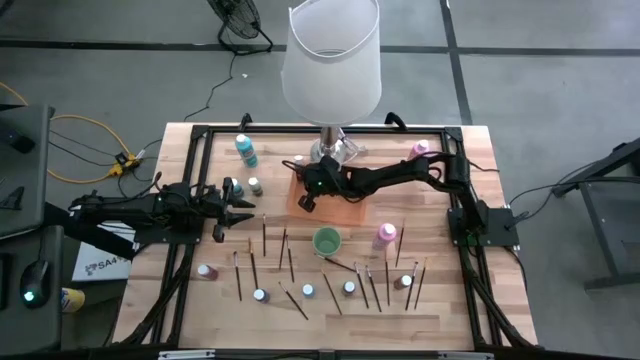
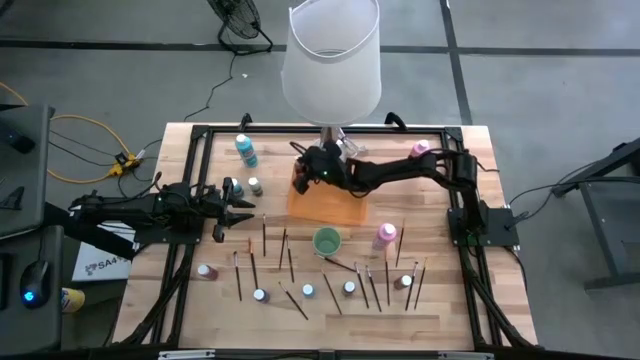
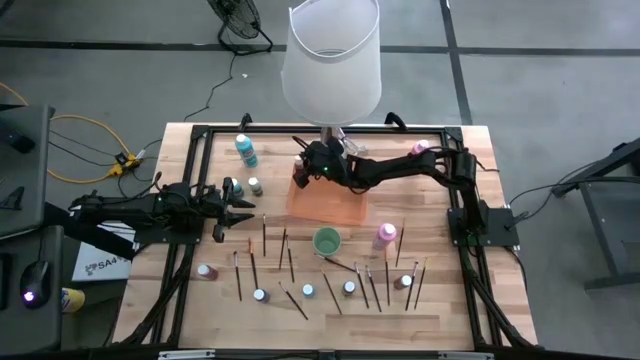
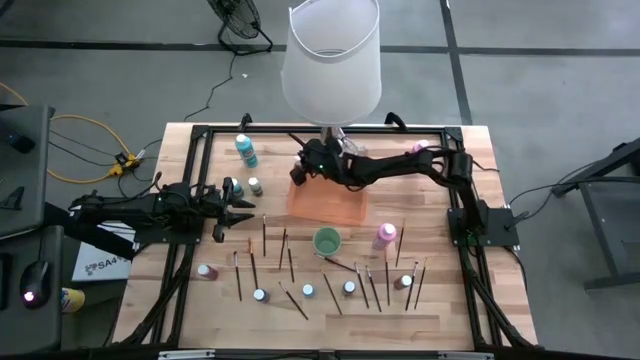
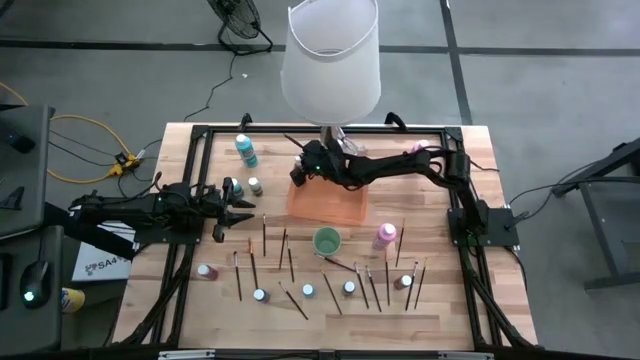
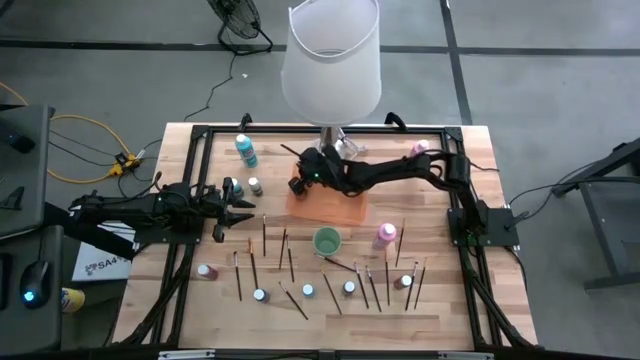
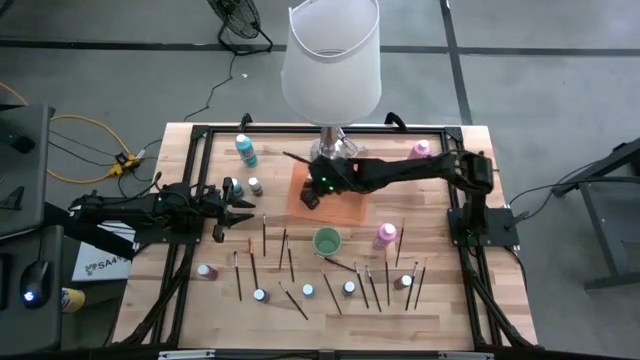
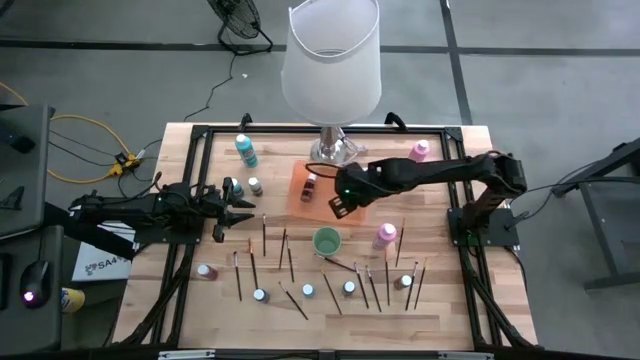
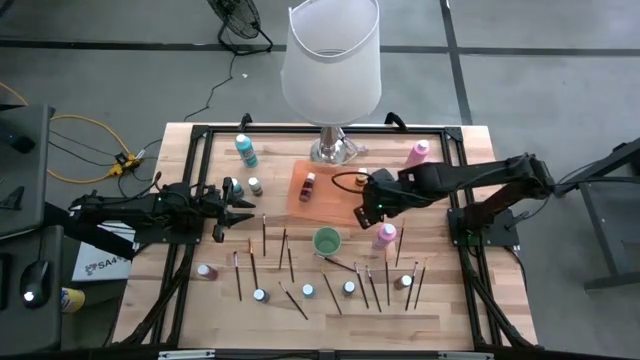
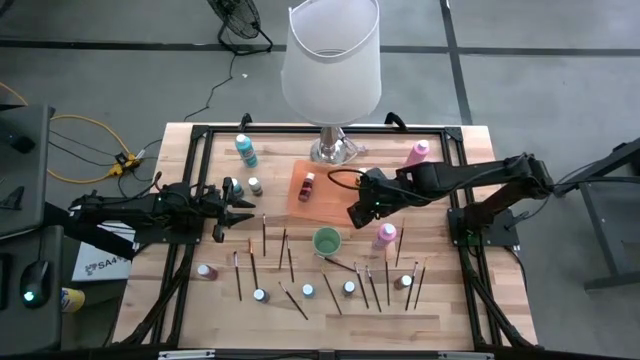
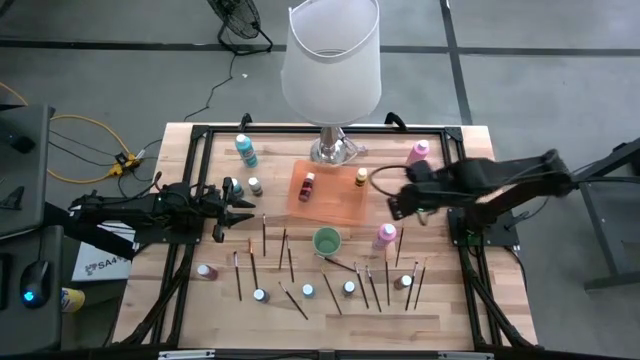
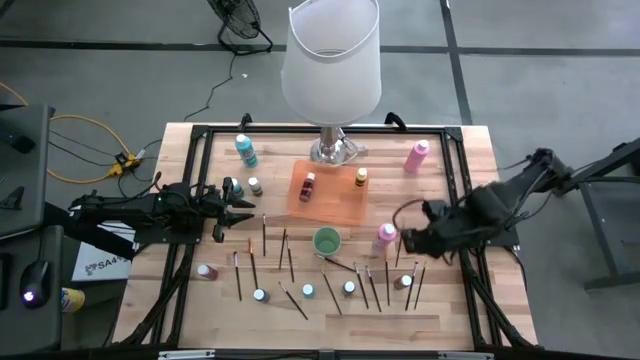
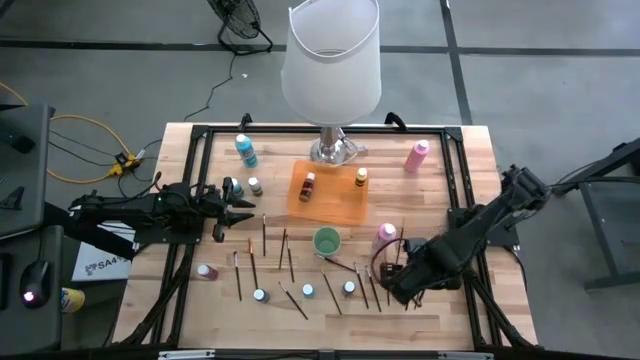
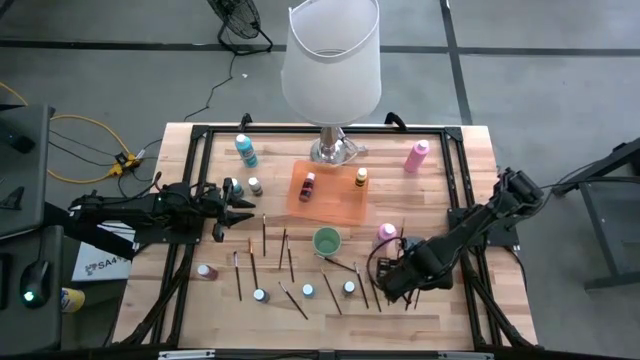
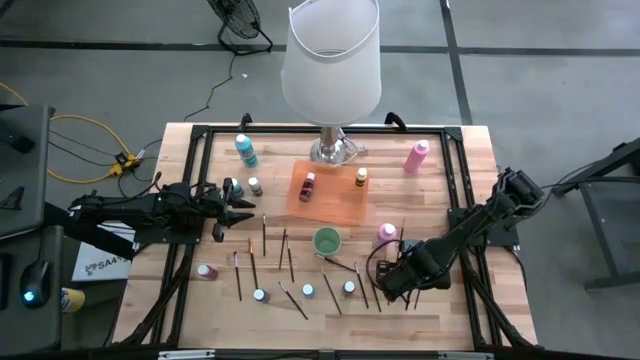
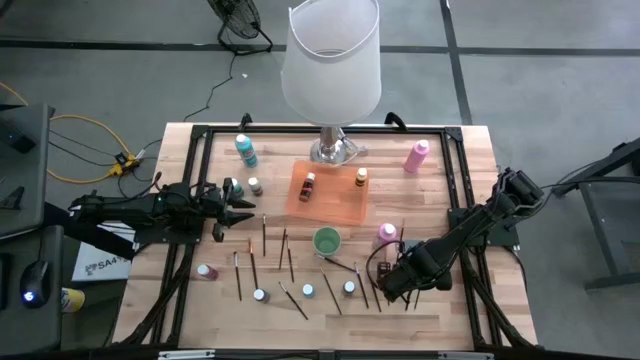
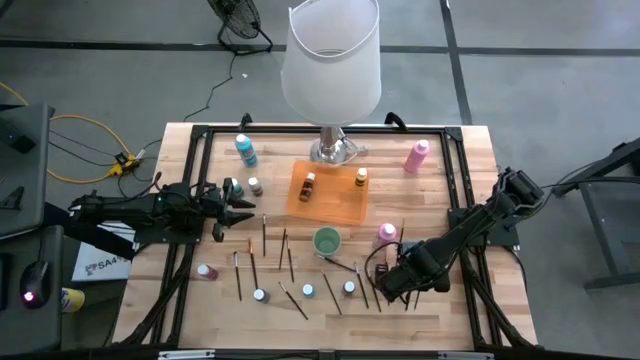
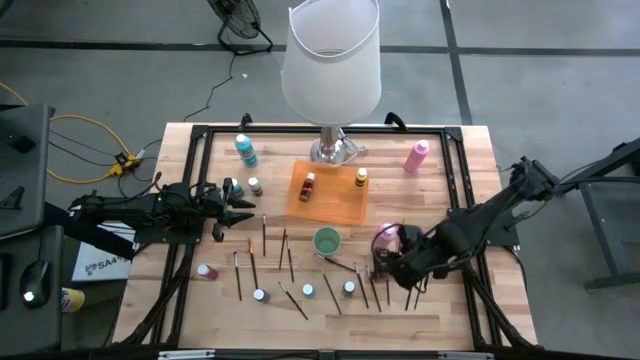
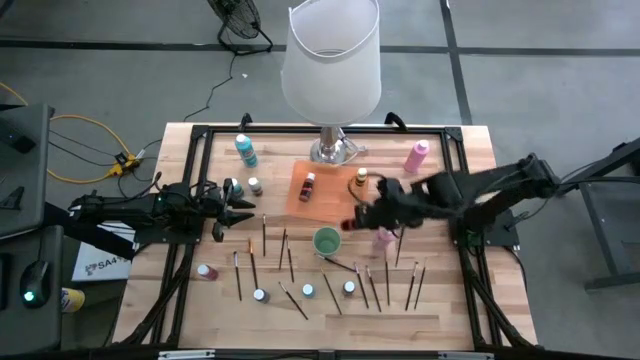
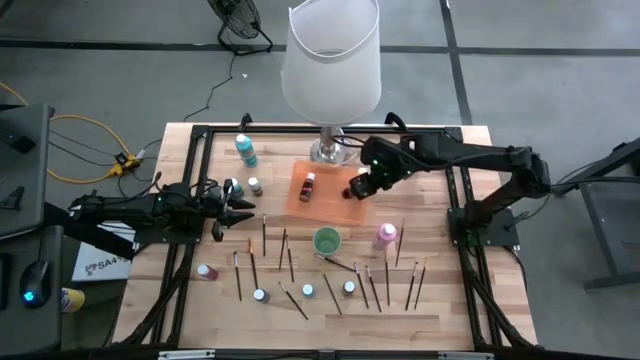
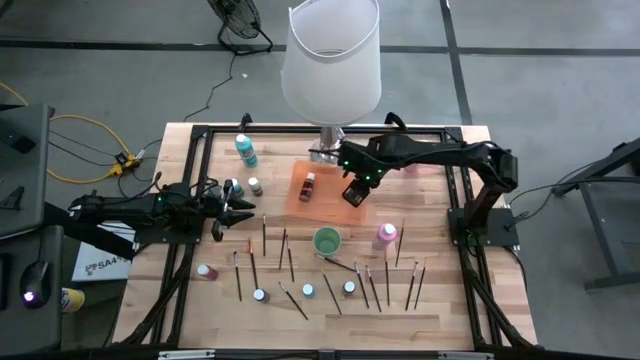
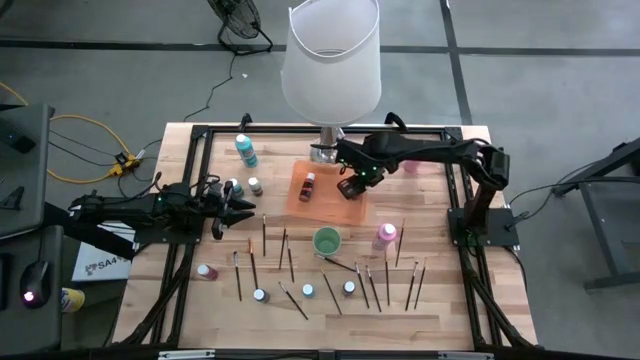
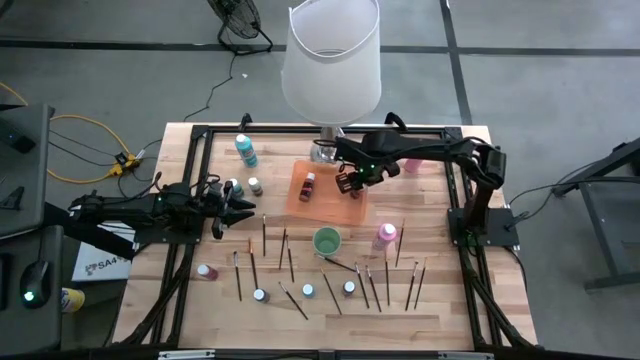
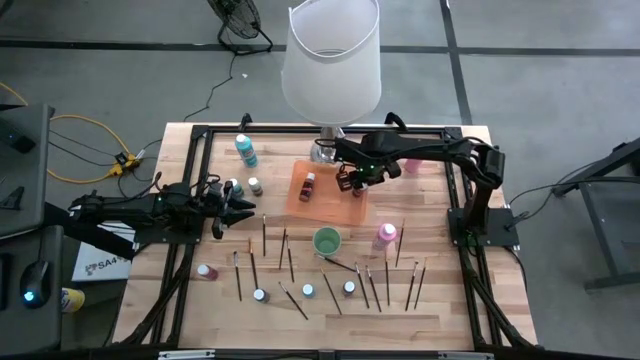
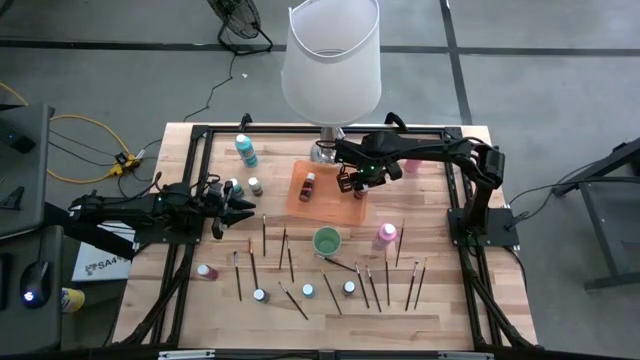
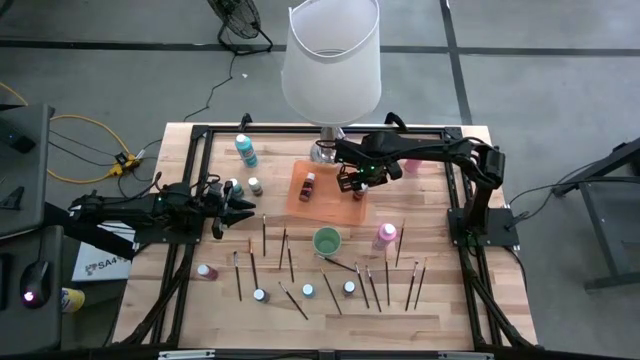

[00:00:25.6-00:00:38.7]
Task: Pick & Place Paint Supplies
Put the small brown paint bottle into the orange bin

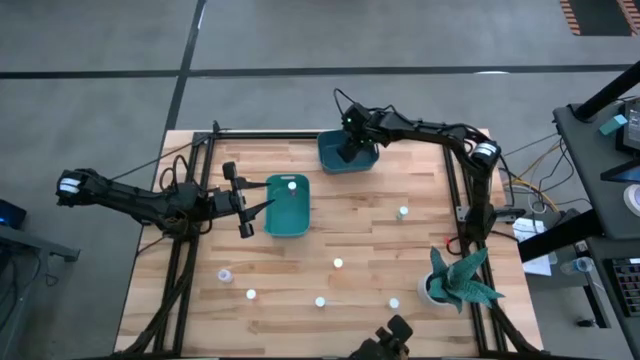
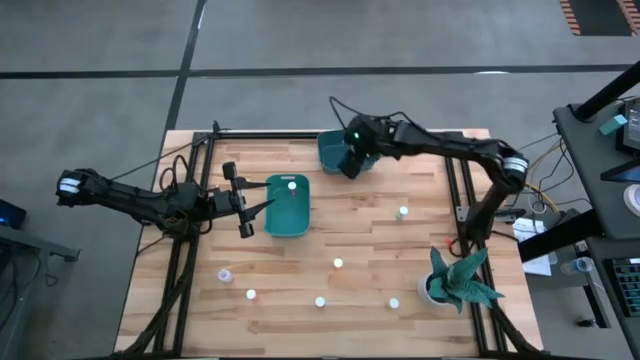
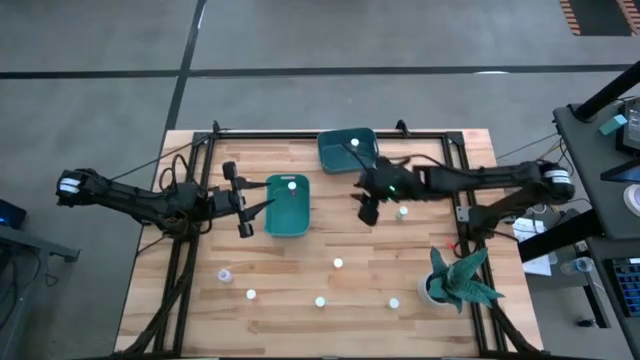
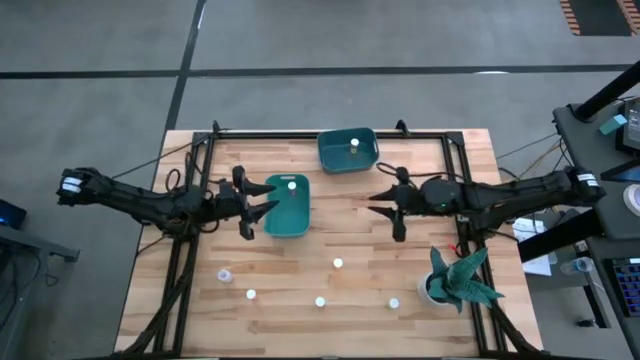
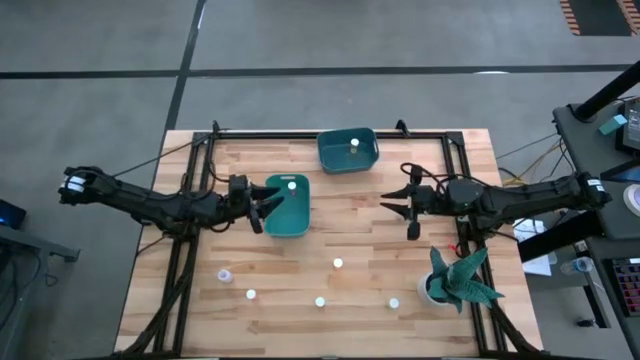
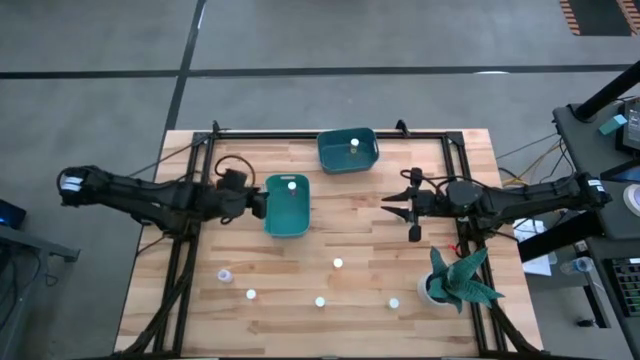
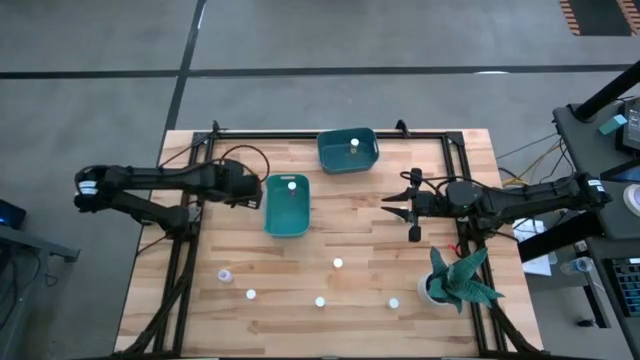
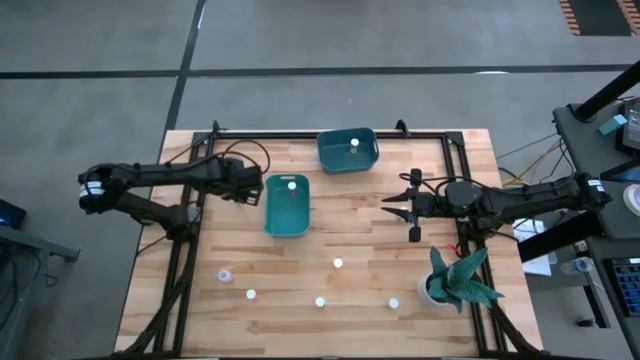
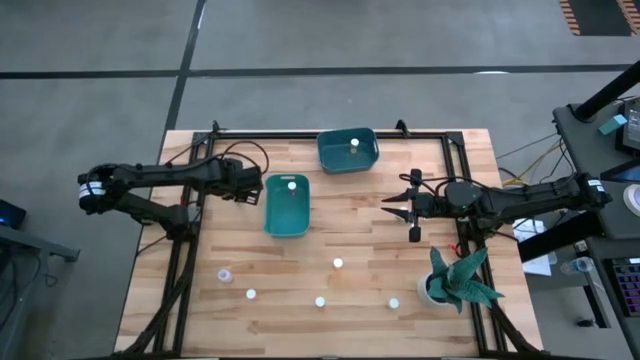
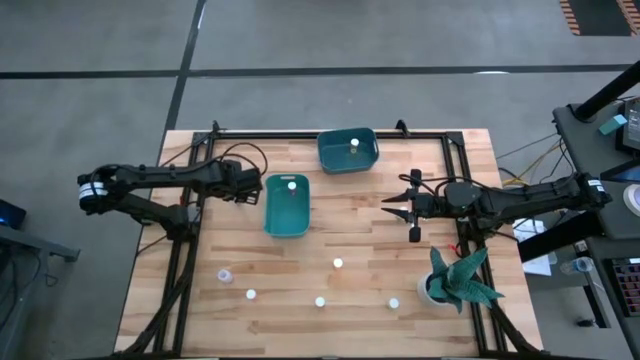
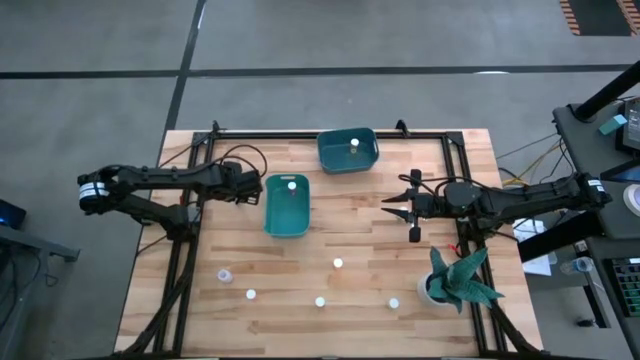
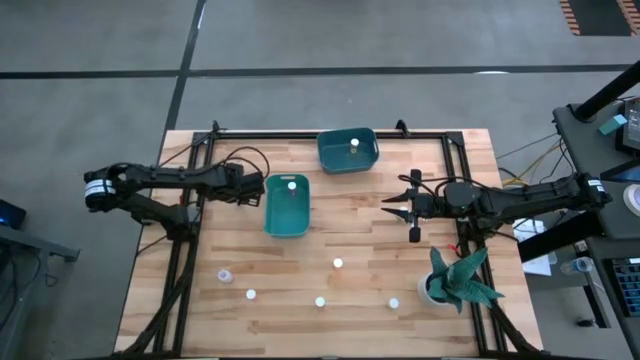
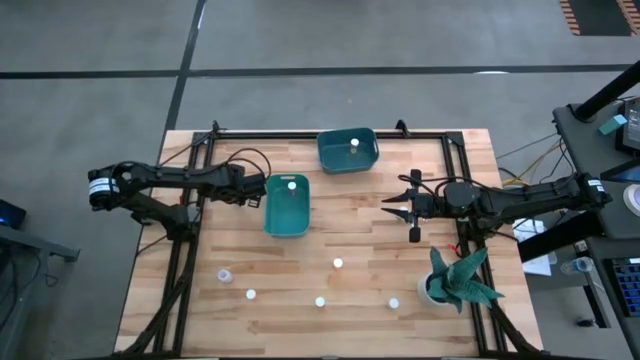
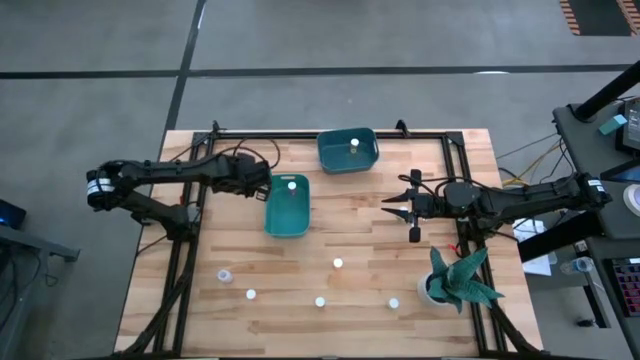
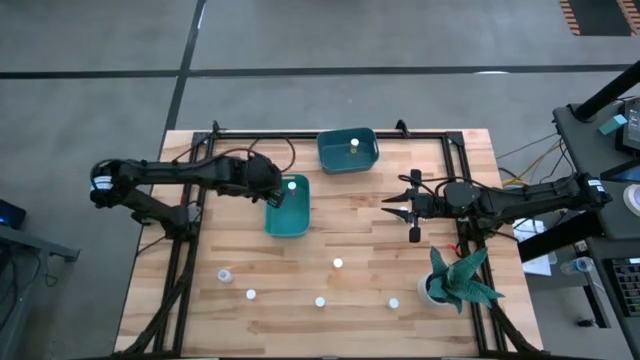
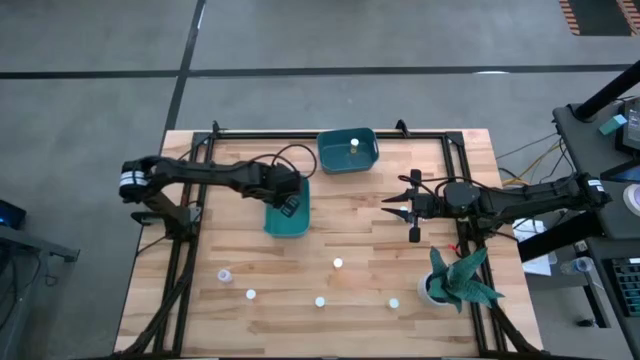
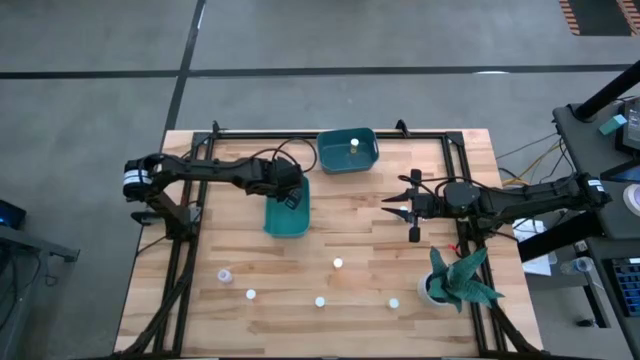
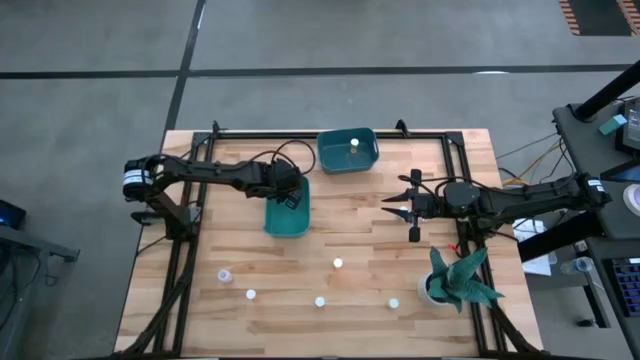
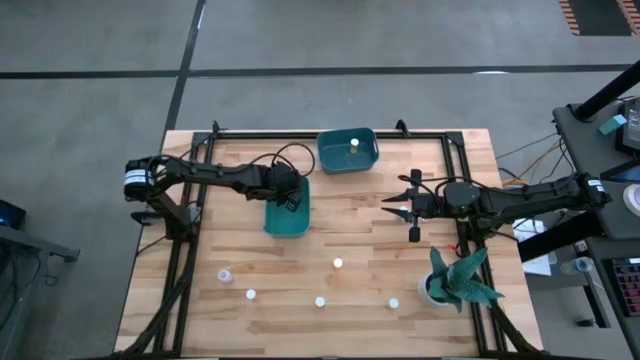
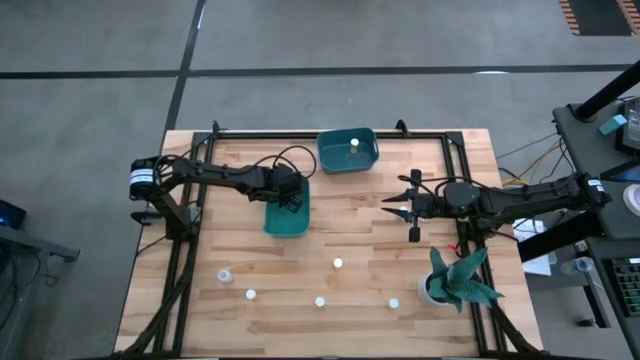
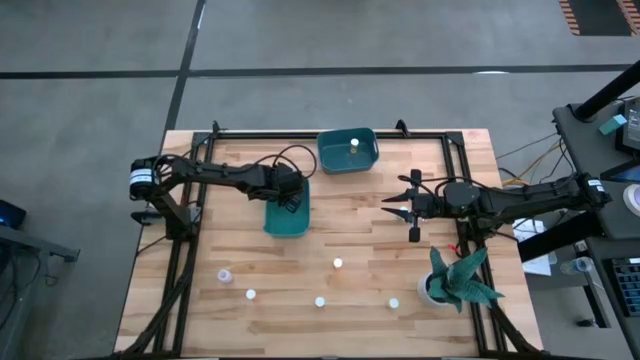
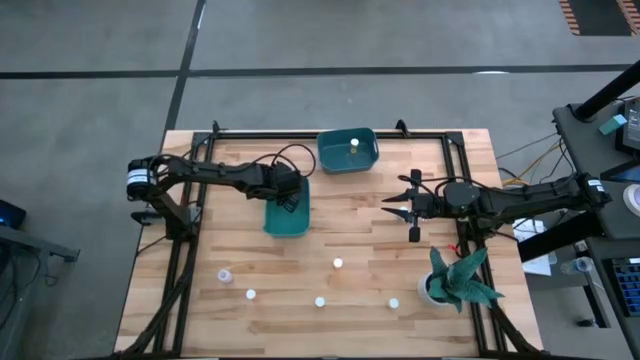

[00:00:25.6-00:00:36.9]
Task: Pick and place medicine bottles into bin by pill shape (circle, oval)
Put the left blue capsule pill bottle into the green bin
